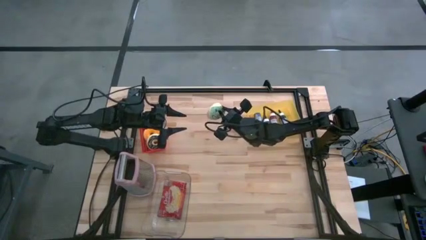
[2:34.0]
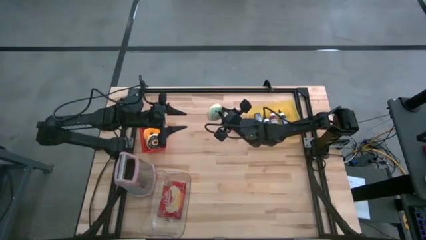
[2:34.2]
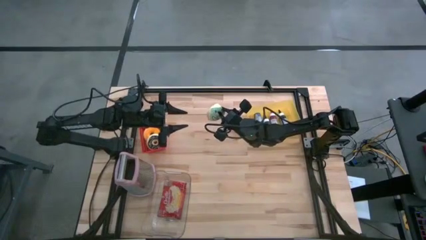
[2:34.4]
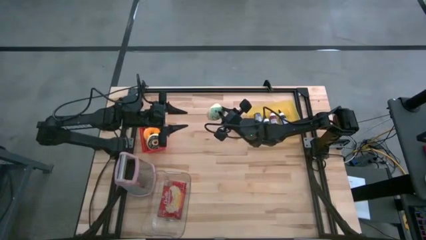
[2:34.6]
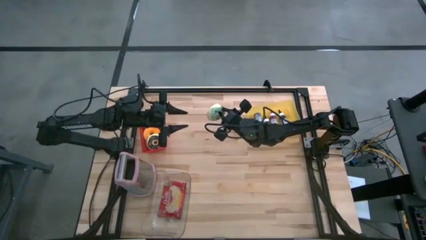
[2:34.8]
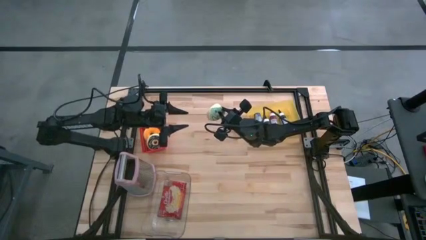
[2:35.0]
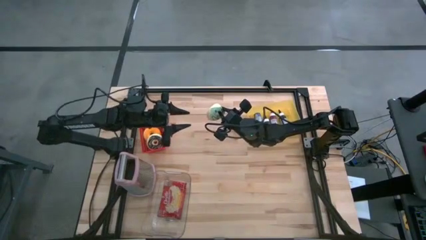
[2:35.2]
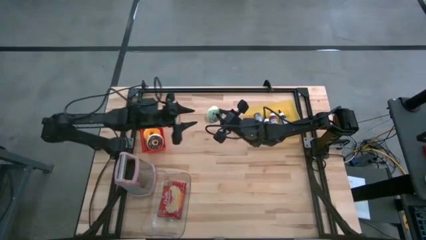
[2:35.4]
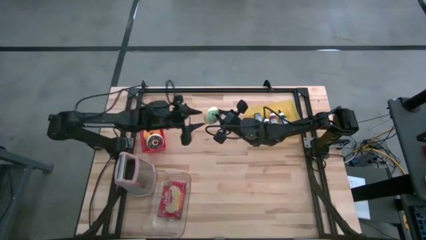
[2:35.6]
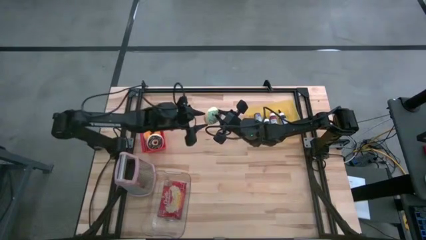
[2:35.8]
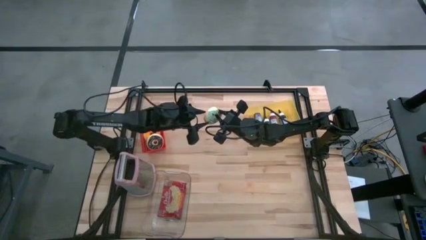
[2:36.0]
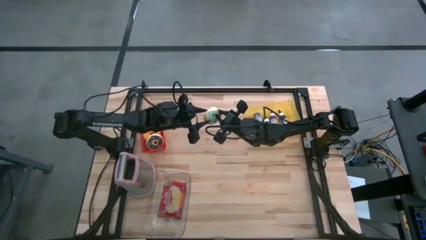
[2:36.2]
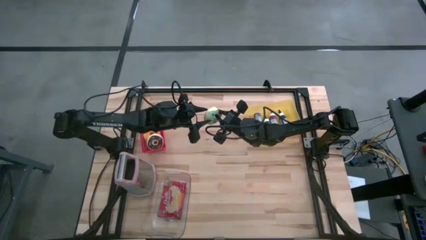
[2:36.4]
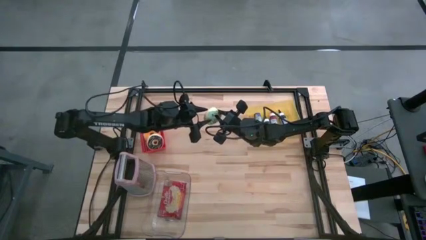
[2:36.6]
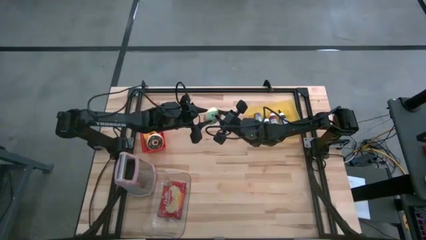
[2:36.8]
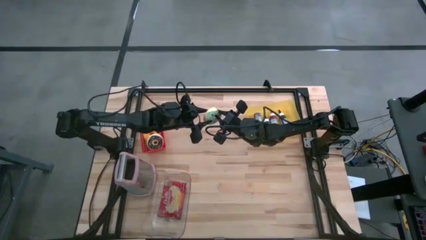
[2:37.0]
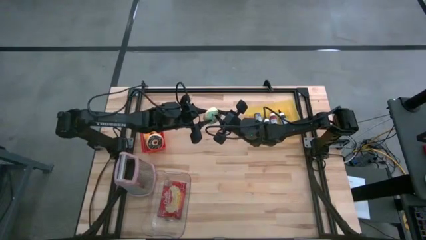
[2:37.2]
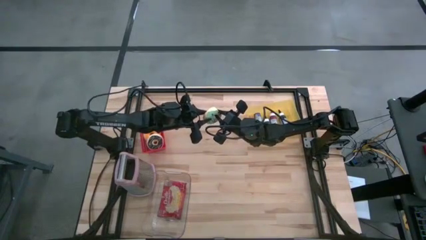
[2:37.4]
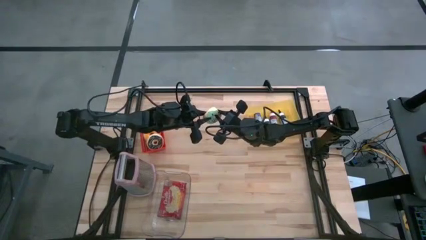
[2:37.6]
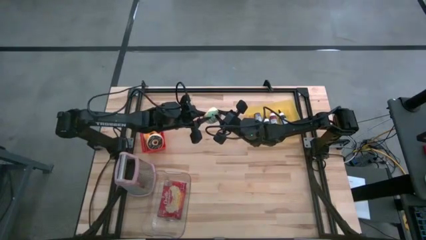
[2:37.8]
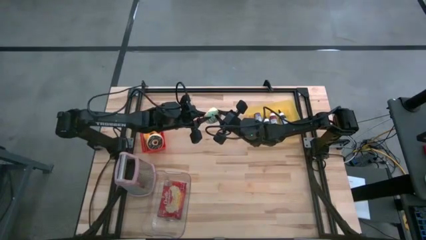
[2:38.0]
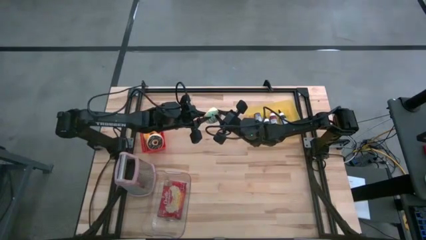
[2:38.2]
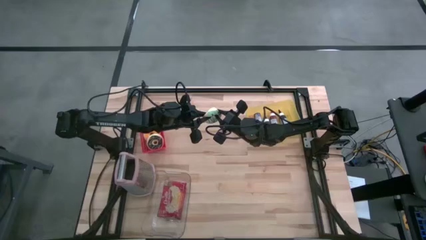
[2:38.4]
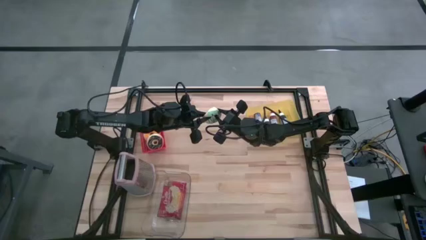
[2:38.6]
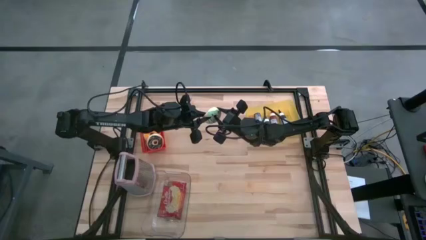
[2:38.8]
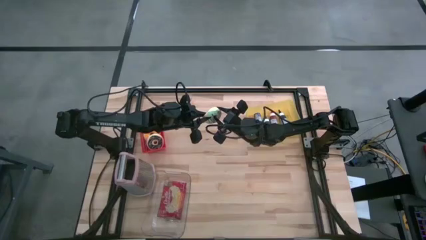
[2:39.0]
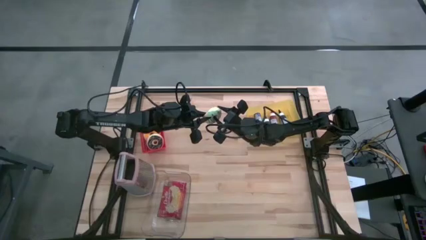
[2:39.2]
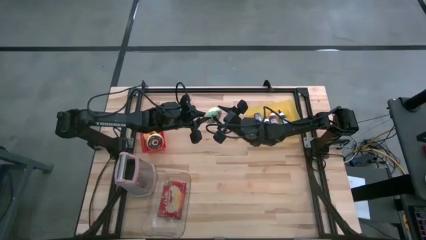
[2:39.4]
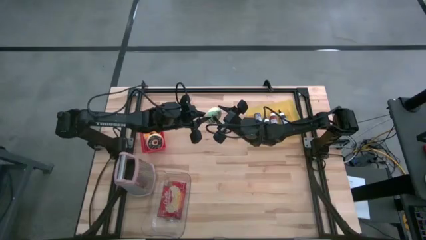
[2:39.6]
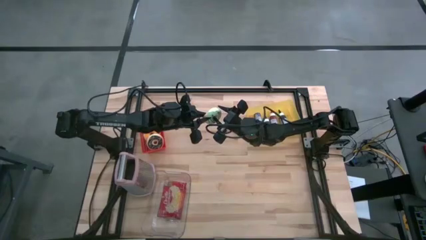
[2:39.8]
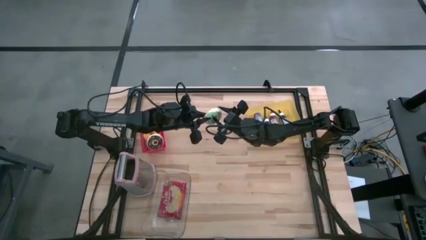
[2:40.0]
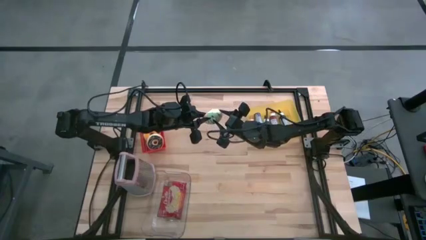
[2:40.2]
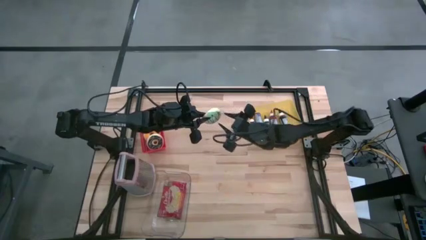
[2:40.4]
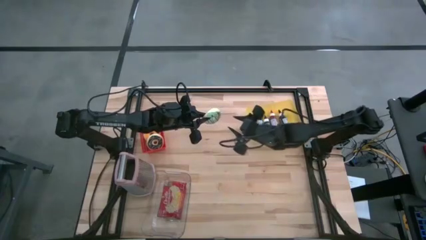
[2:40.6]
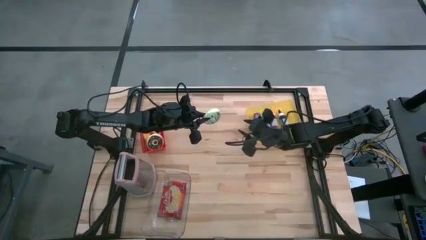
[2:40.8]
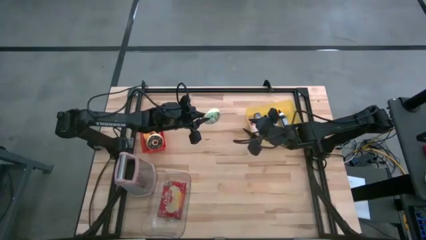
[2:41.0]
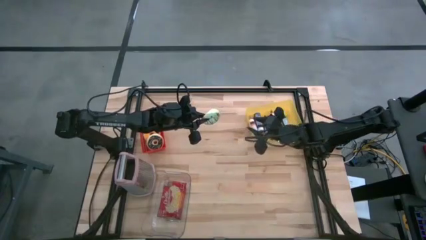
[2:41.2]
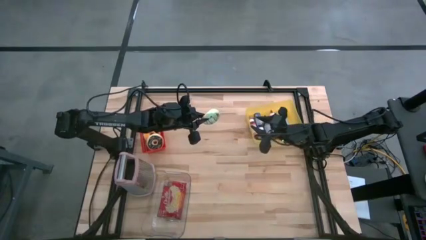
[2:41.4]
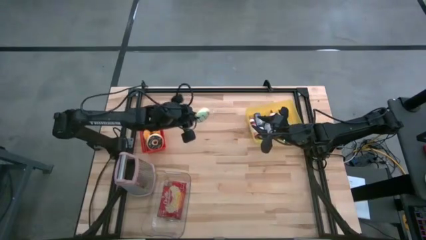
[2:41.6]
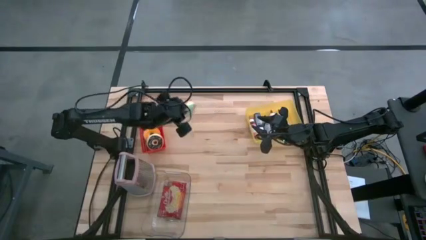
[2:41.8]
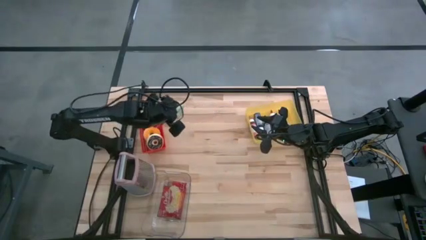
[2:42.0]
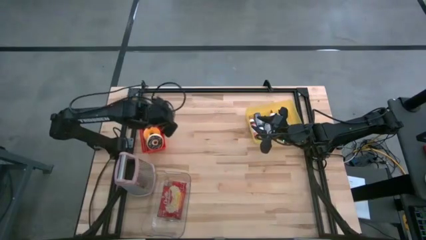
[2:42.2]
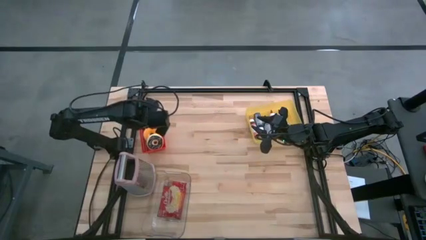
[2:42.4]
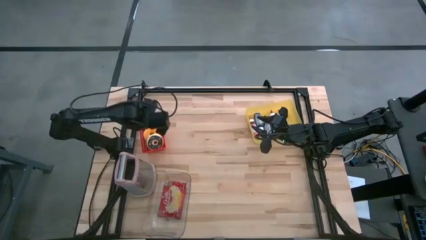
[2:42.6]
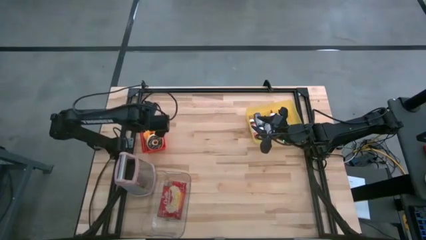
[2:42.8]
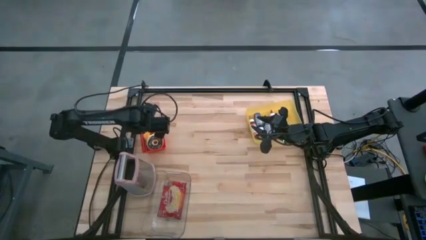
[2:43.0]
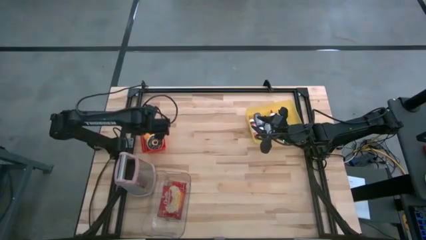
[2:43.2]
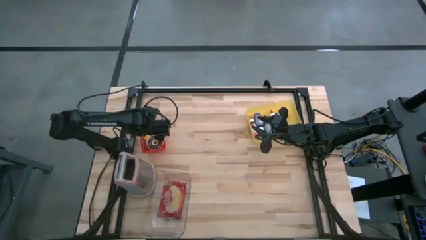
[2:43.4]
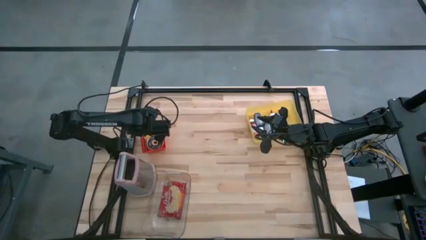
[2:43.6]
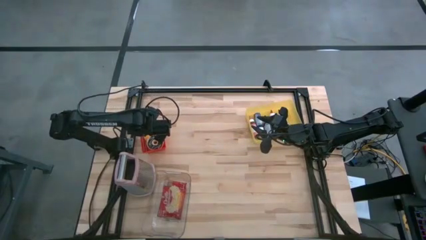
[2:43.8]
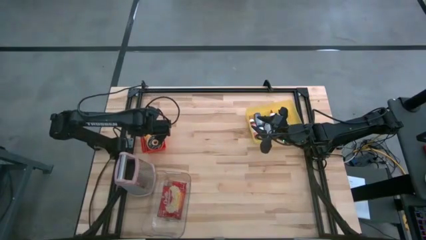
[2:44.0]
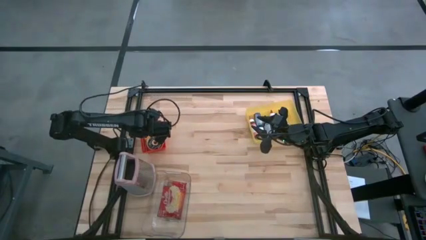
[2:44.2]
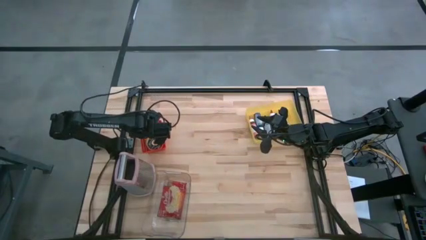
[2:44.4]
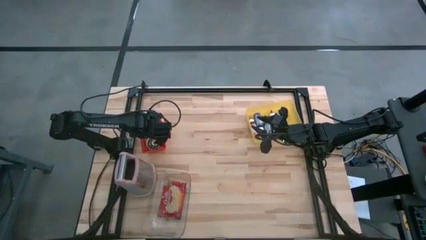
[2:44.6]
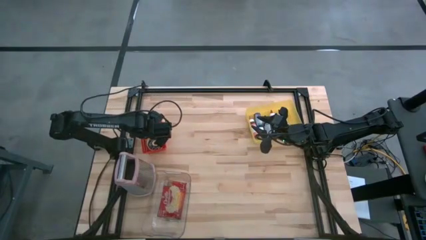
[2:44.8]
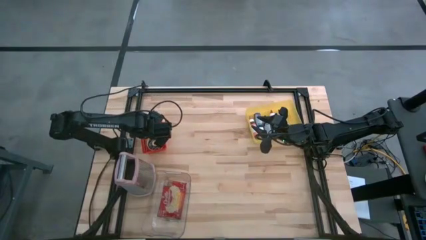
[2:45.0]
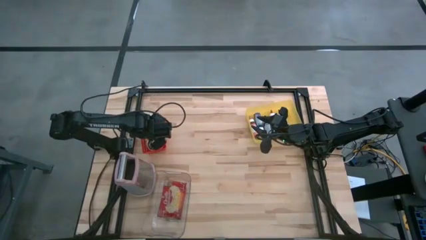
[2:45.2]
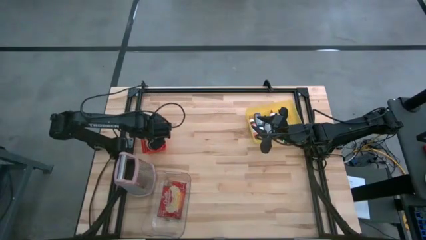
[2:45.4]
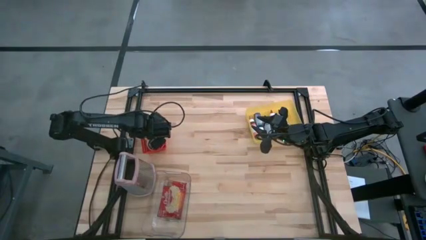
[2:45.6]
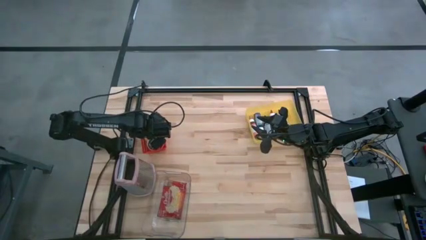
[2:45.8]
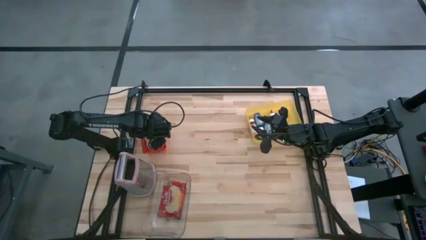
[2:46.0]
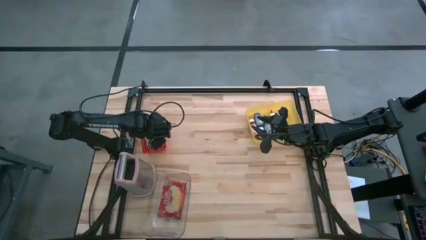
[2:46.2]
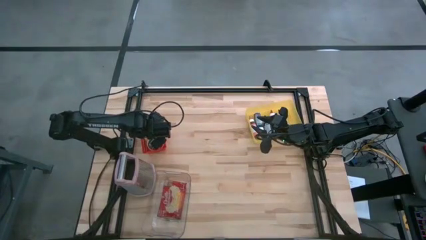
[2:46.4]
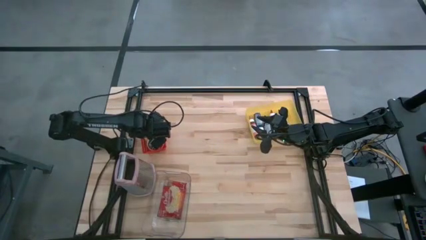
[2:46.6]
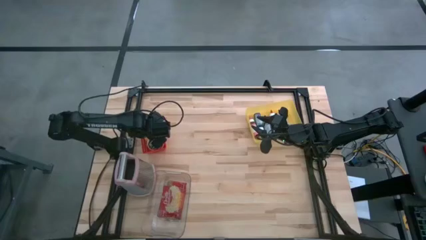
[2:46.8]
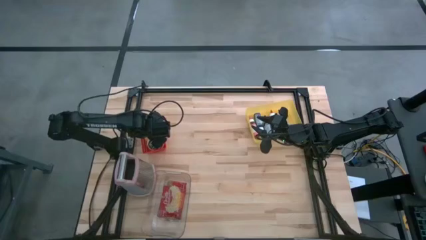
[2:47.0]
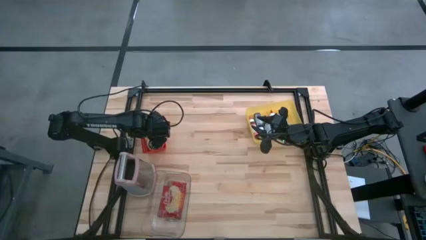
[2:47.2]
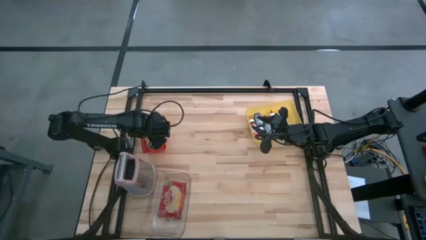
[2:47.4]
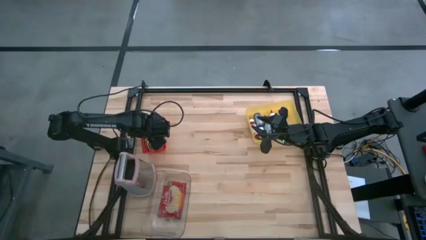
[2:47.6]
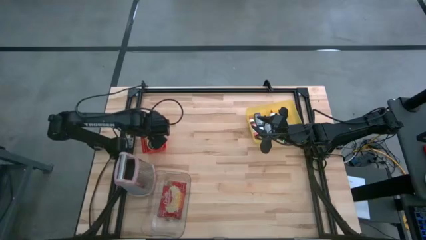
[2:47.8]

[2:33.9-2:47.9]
Task: Pick & Place Food Item
Put the green donut into the red bin
